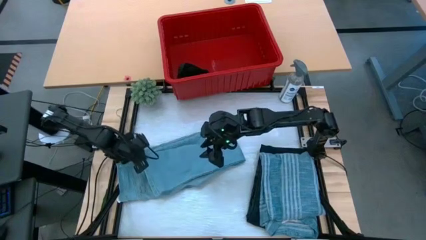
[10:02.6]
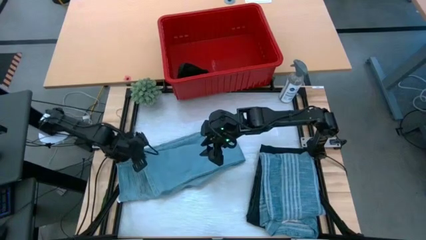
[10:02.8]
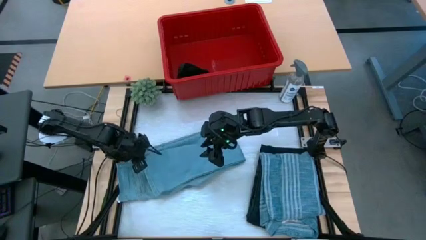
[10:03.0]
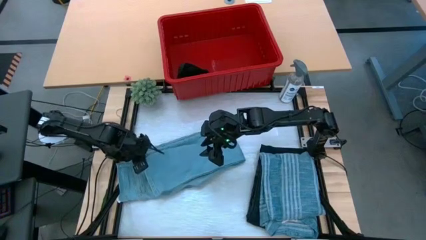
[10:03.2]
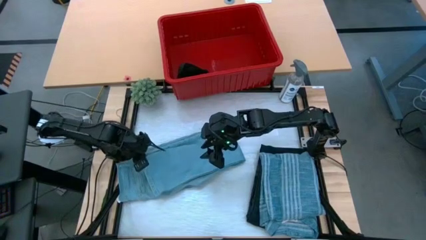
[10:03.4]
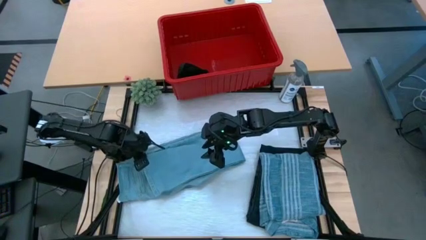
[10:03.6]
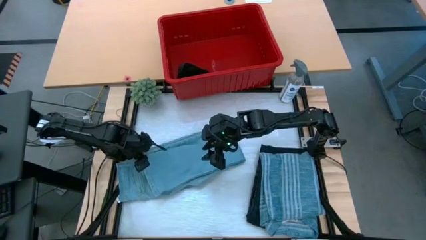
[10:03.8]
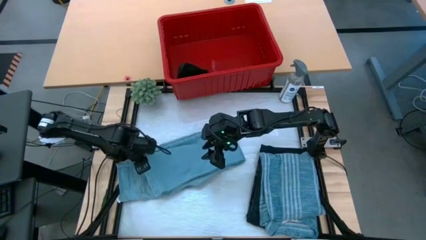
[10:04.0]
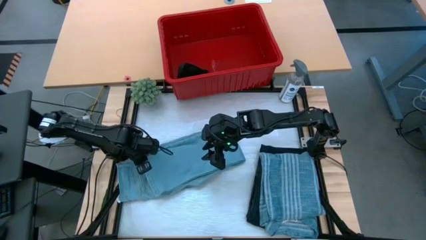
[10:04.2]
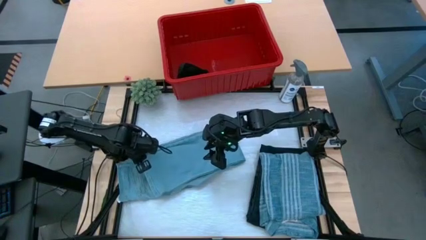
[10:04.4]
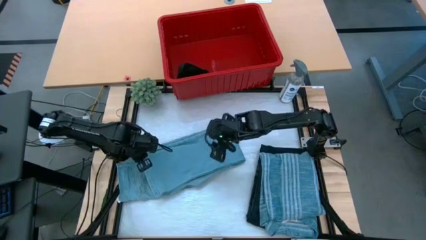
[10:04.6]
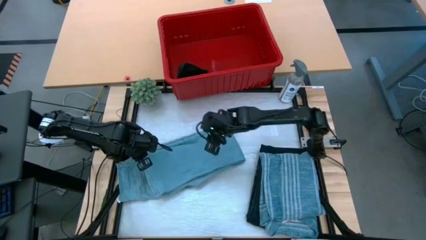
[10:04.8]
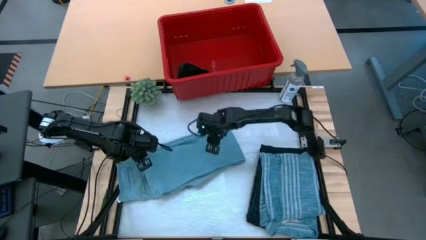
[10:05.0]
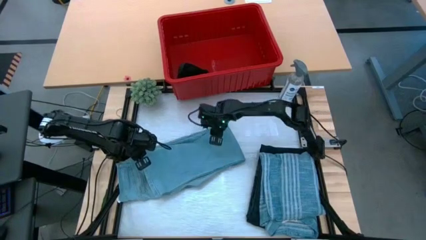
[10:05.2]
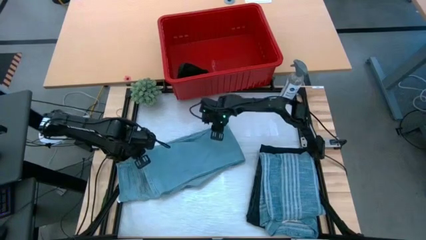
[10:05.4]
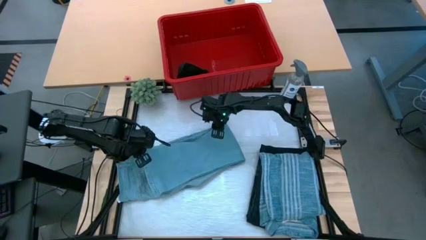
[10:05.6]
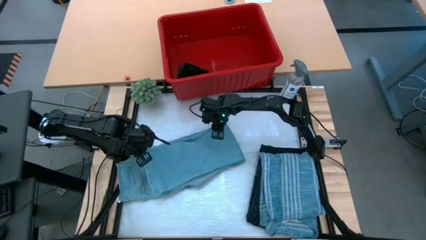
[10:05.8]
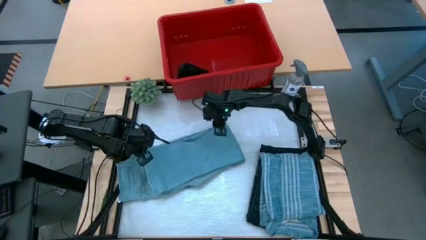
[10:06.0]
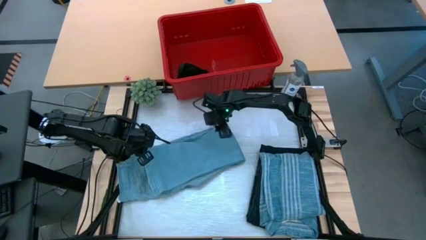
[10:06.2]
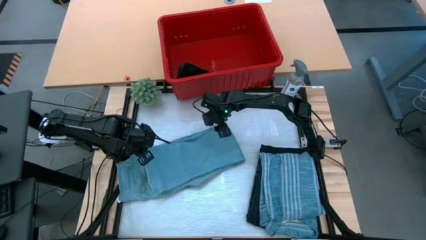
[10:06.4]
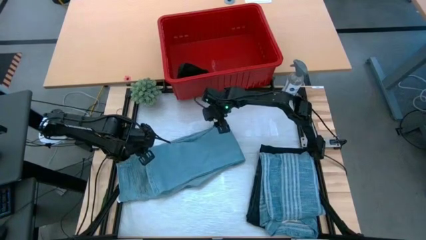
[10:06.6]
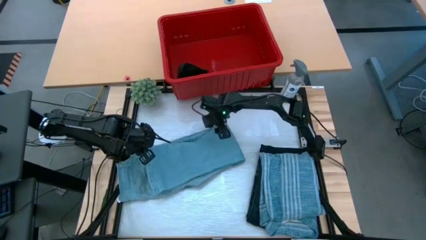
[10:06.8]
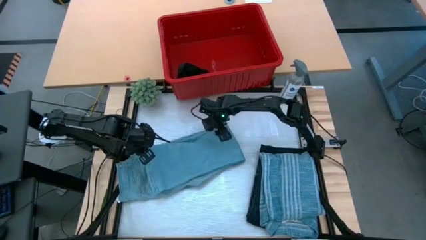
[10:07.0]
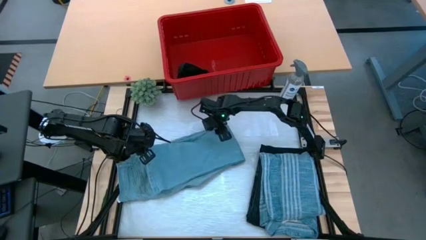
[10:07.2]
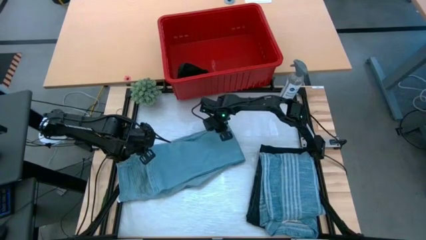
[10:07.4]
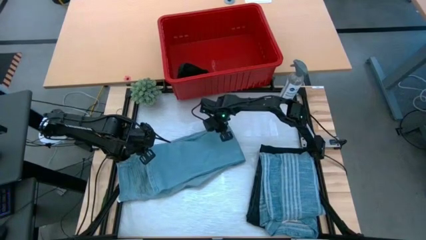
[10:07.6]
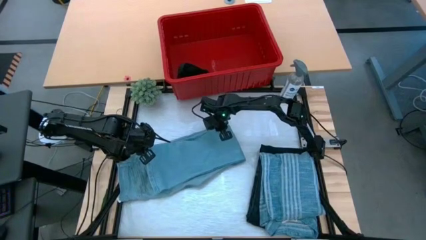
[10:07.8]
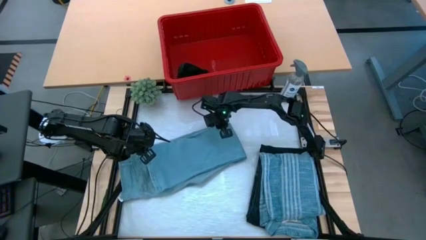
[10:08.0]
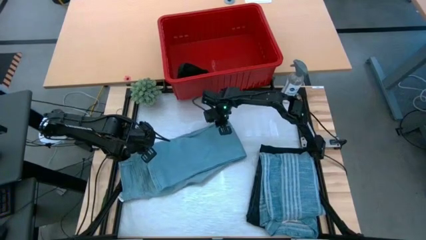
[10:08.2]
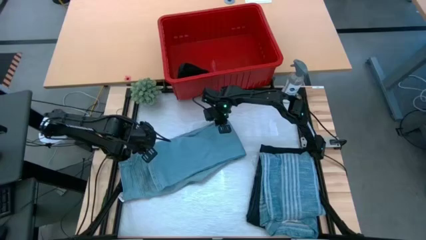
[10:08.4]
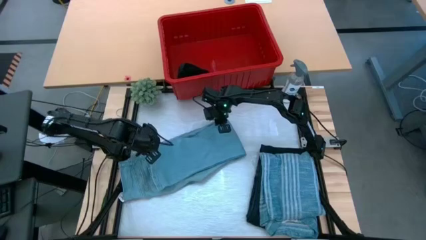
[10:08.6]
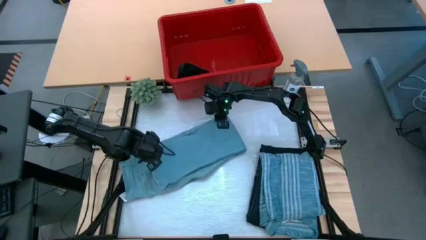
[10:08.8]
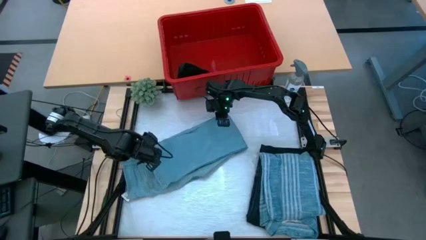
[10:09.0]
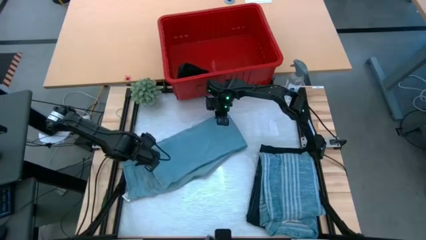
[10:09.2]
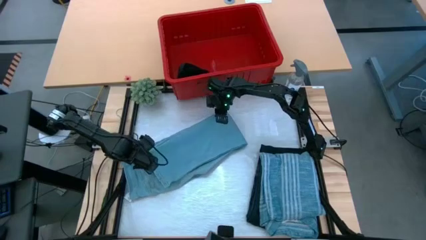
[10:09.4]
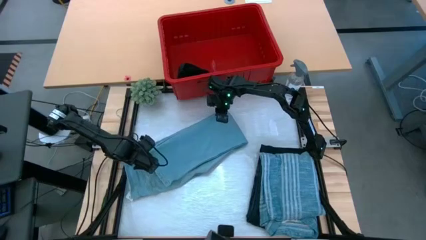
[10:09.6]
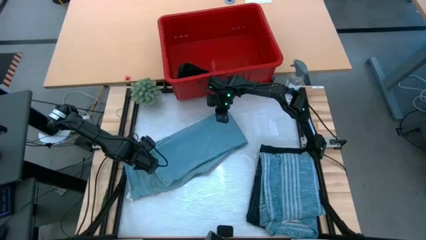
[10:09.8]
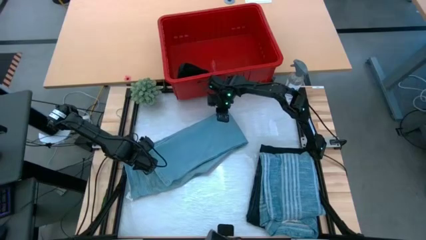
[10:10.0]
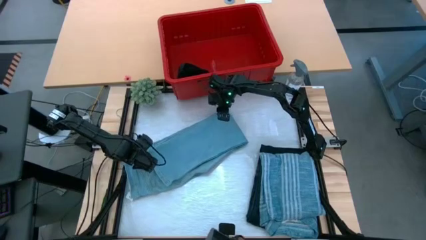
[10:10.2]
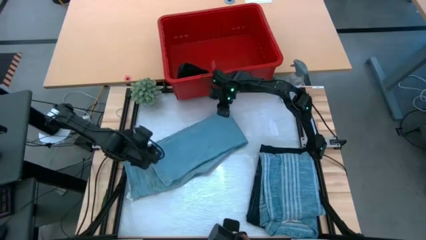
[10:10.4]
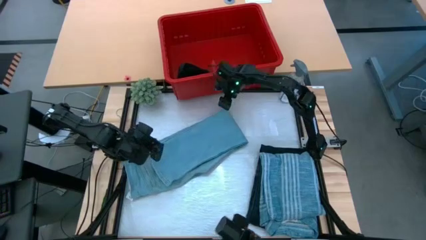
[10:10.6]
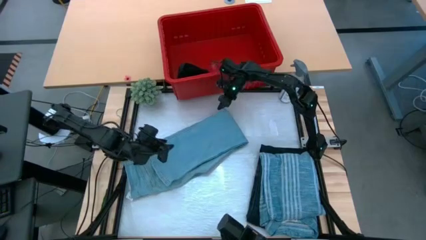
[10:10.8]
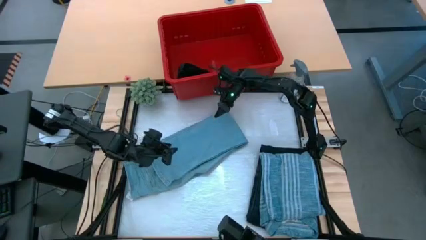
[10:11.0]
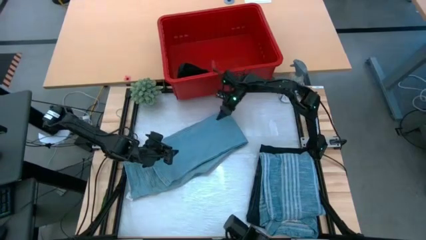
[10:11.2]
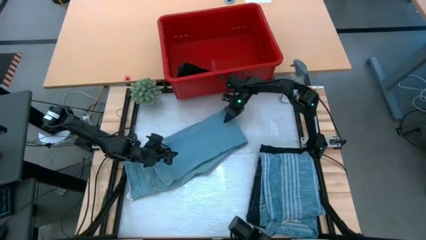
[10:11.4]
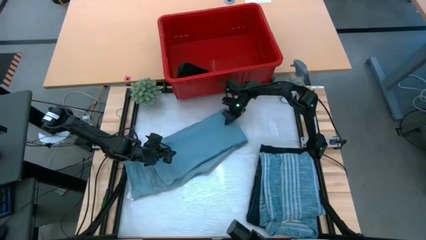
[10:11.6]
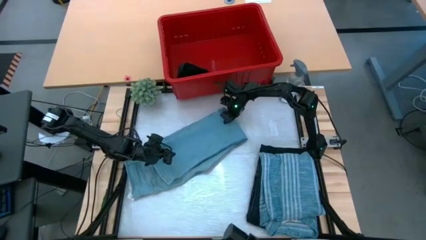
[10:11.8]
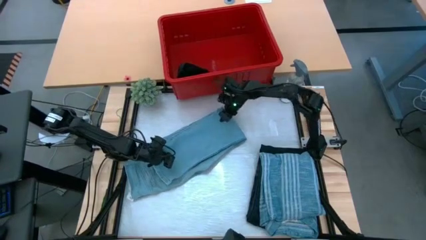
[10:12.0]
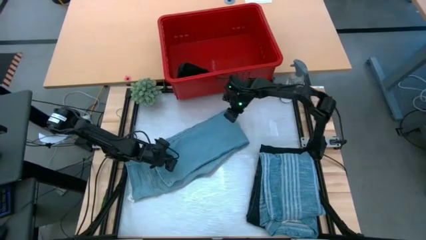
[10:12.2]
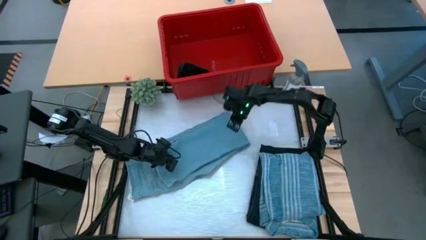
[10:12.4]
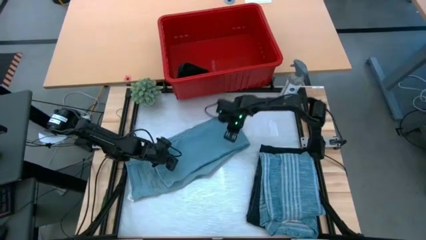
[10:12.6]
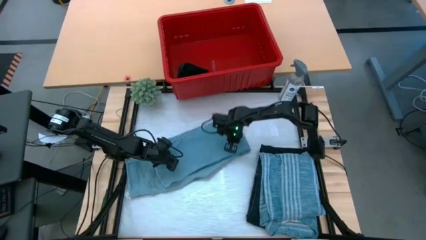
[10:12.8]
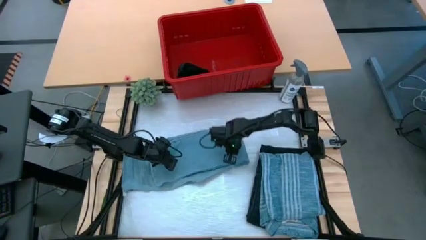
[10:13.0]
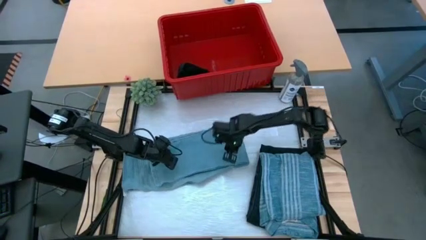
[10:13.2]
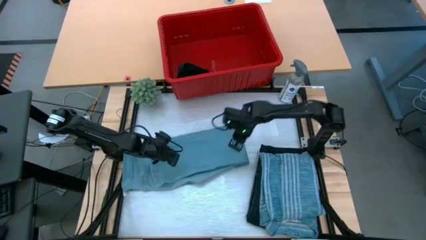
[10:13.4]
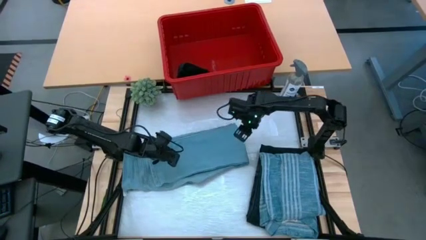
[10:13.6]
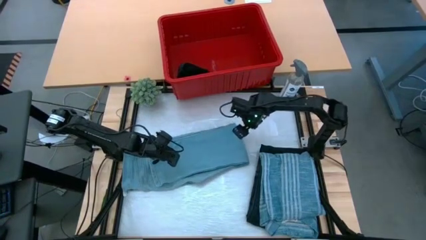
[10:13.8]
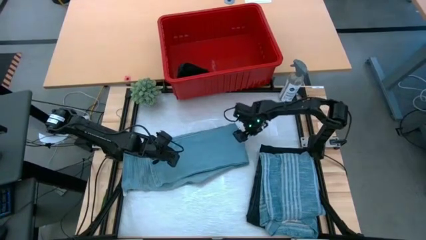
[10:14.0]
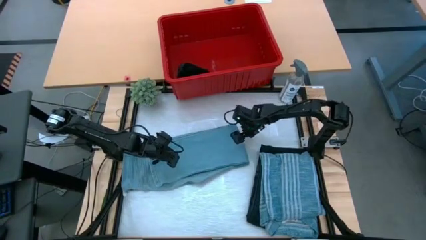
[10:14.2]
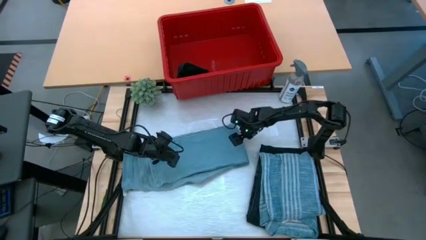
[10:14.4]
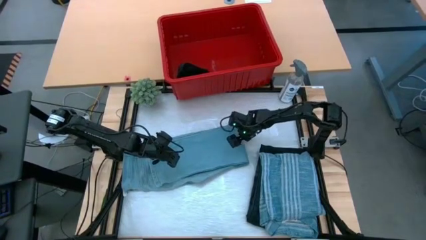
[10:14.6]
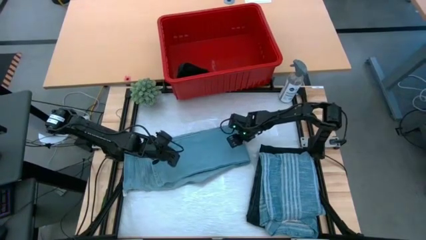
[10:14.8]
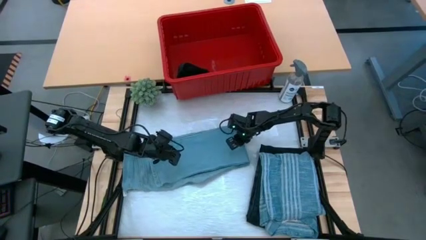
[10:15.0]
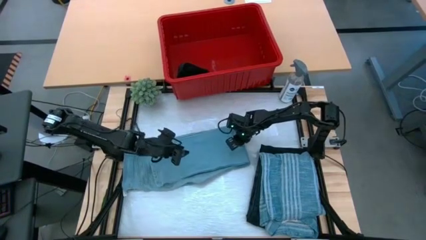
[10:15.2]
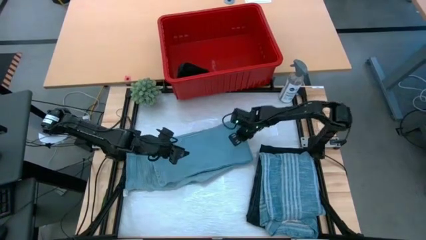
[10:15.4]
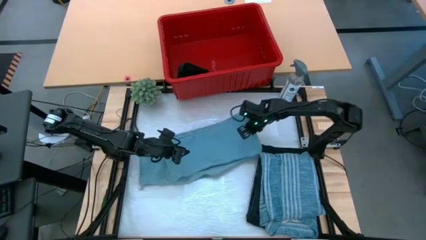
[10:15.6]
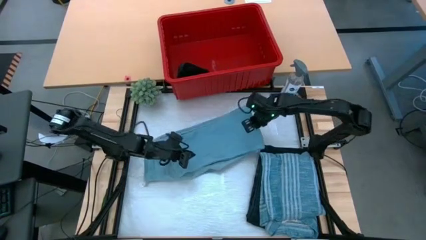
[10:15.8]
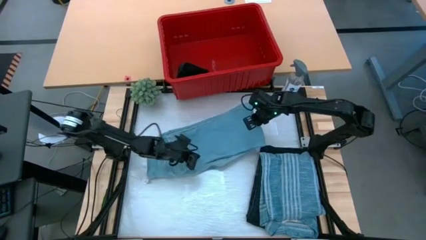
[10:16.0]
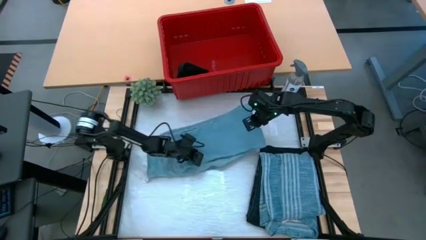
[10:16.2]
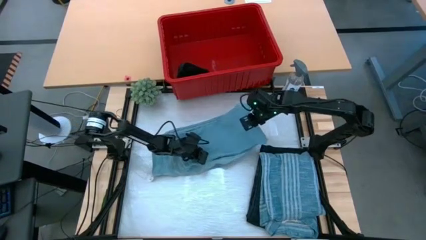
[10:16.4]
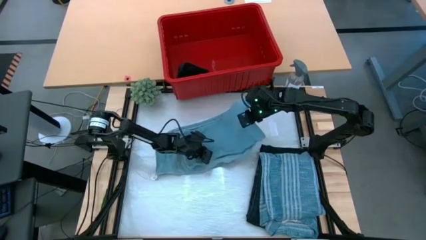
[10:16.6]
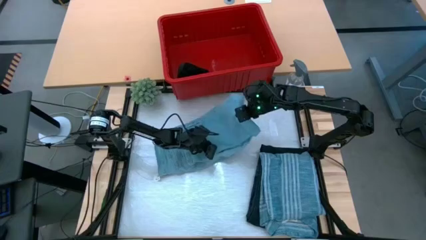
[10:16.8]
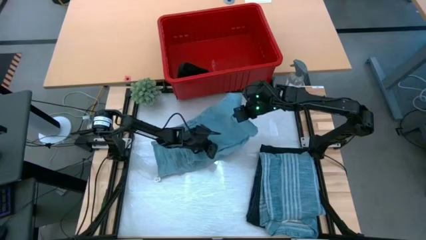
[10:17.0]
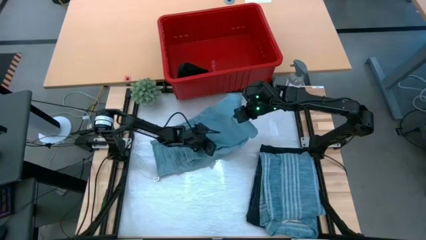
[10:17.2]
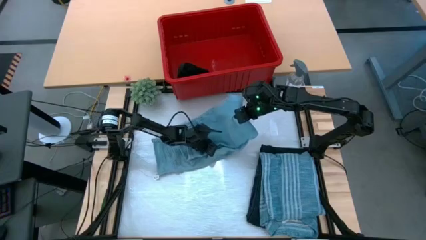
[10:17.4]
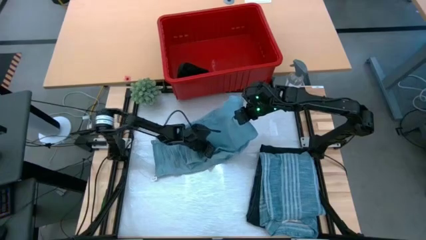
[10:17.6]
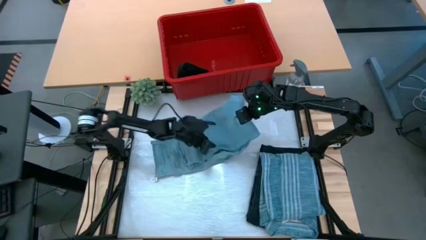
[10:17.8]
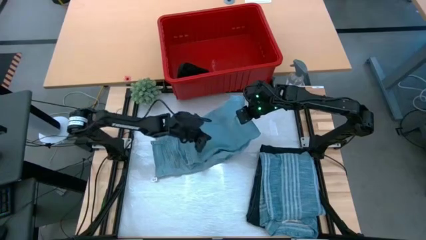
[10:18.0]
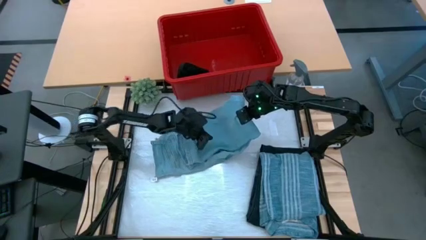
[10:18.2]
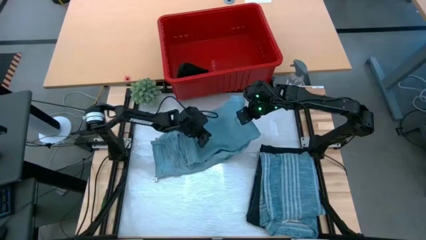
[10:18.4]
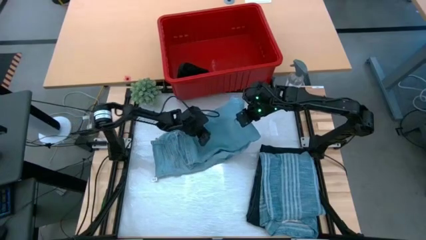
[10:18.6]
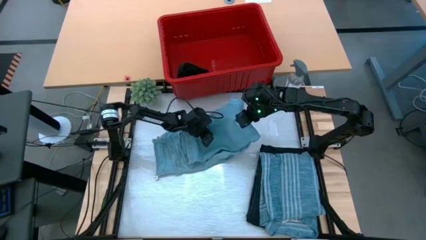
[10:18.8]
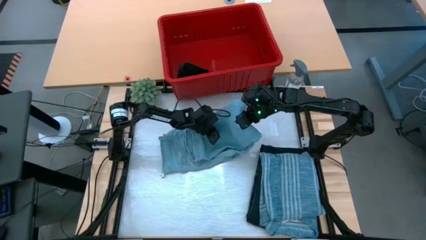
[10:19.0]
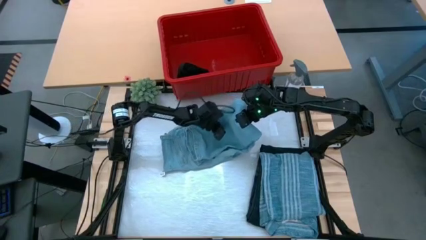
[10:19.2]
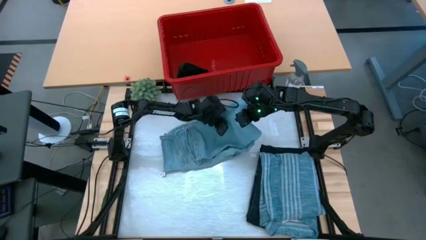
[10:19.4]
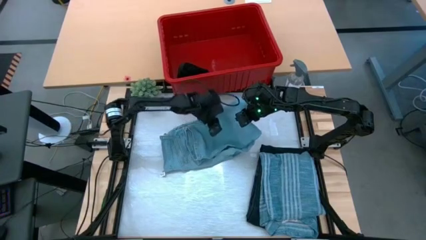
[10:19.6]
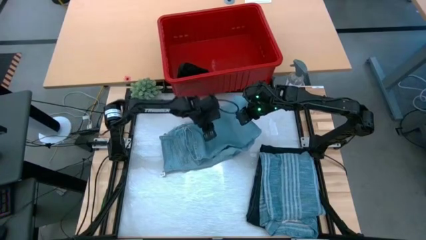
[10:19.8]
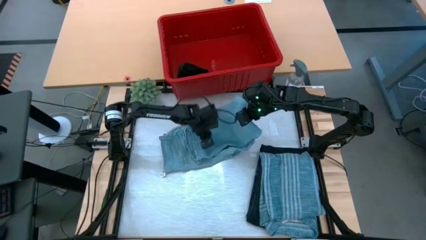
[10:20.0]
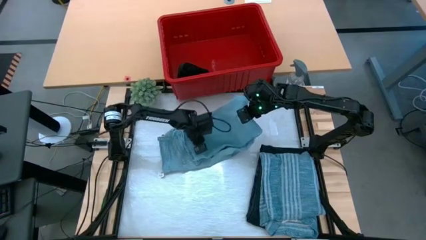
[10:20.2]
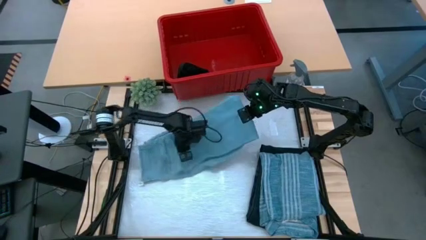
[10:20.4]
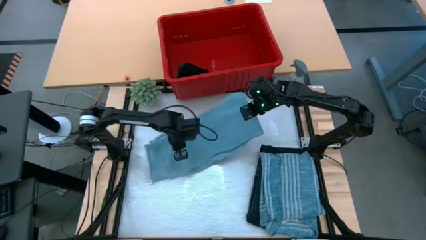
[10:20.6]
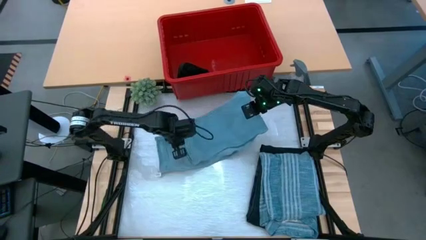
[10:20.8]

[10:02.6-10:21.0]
Task: Fold Laundry from Bin
Fold the light blue denim pants
